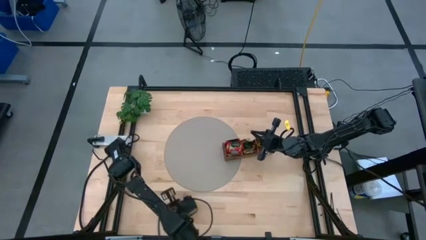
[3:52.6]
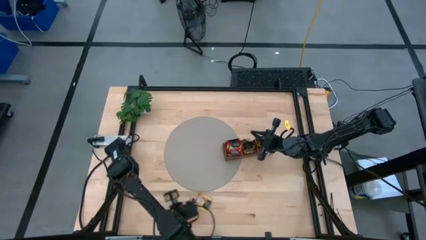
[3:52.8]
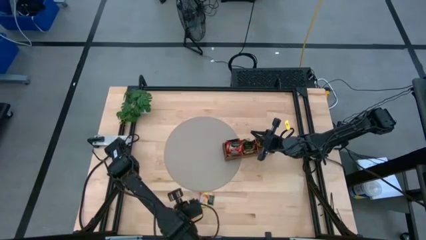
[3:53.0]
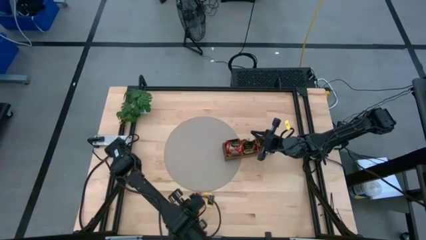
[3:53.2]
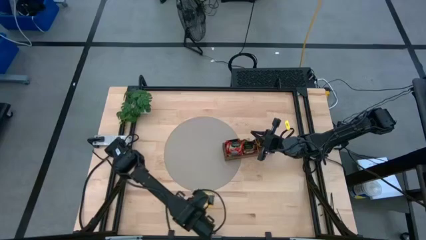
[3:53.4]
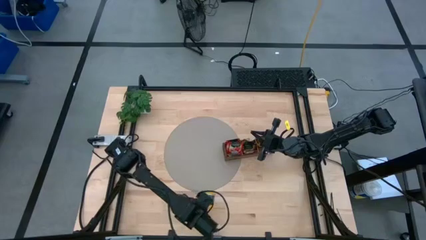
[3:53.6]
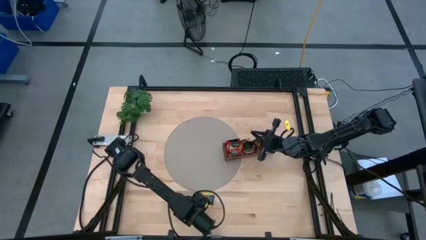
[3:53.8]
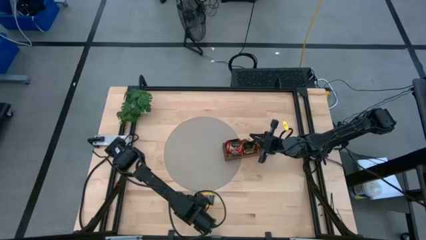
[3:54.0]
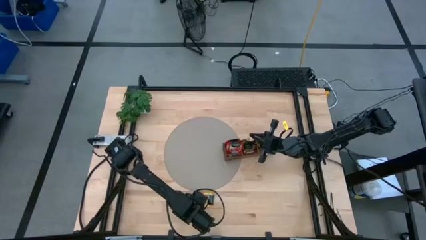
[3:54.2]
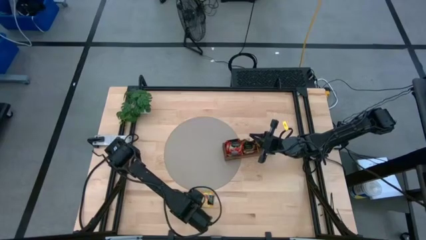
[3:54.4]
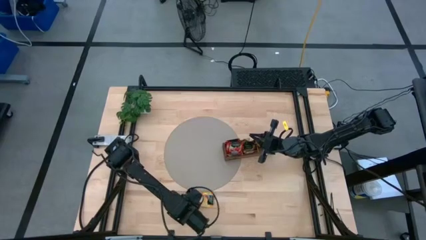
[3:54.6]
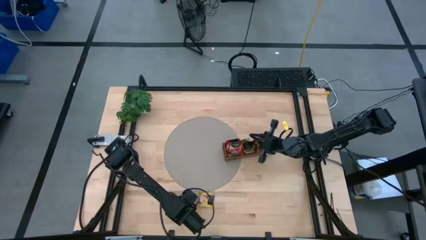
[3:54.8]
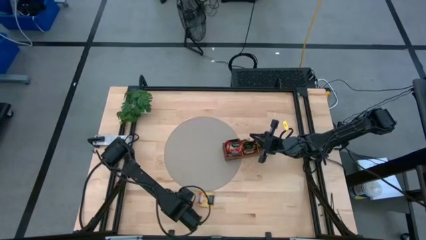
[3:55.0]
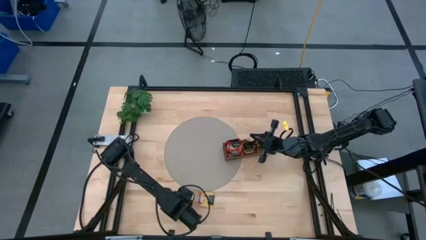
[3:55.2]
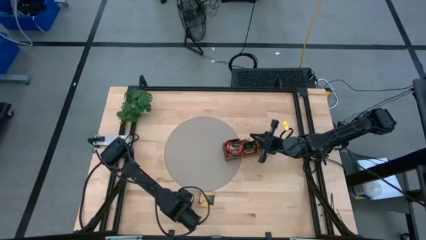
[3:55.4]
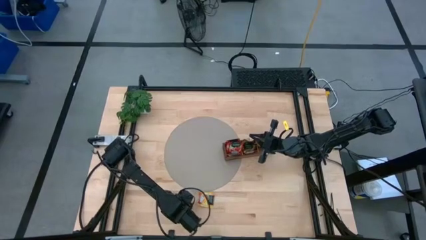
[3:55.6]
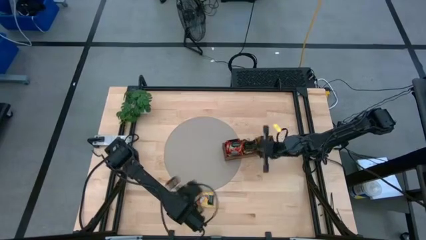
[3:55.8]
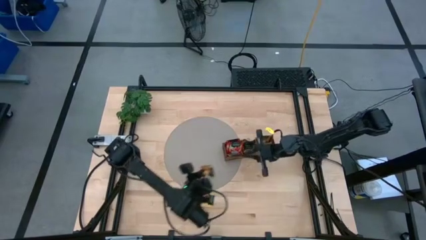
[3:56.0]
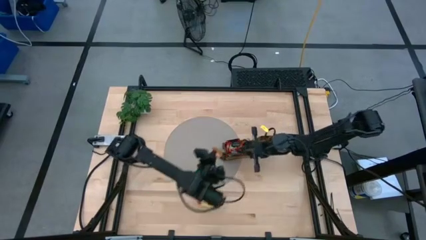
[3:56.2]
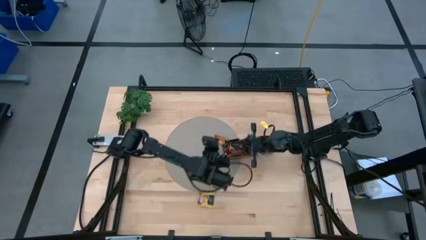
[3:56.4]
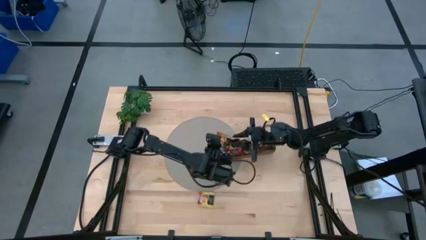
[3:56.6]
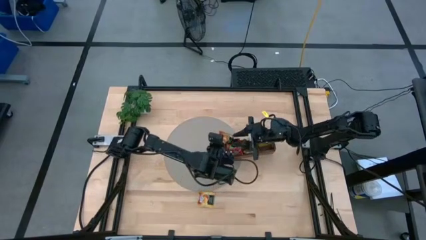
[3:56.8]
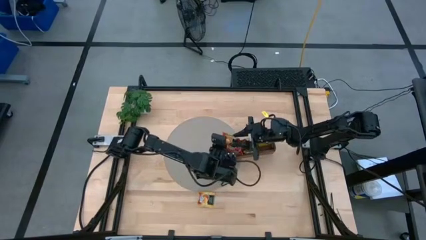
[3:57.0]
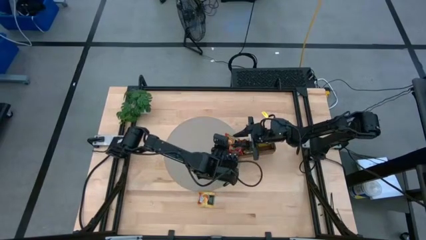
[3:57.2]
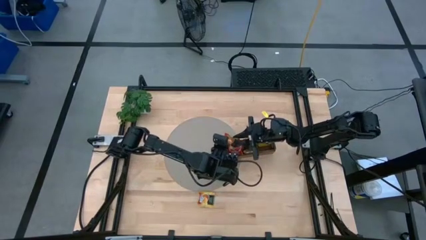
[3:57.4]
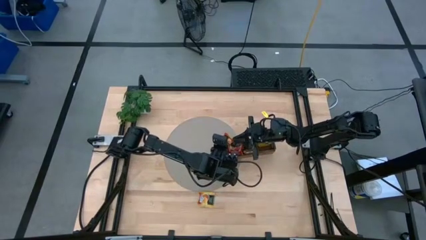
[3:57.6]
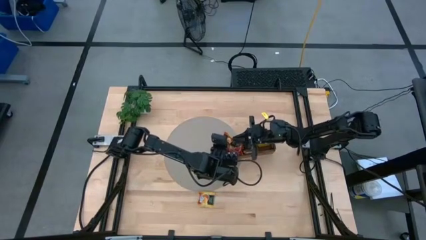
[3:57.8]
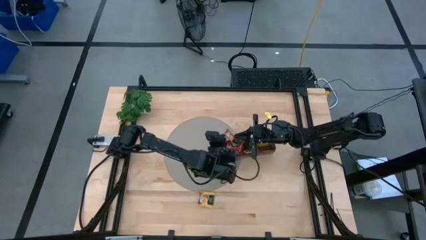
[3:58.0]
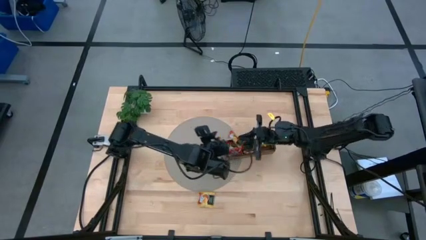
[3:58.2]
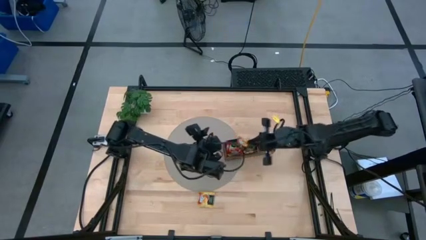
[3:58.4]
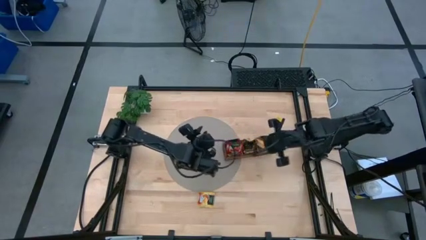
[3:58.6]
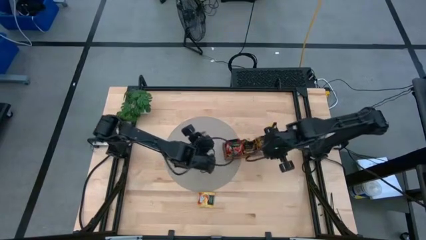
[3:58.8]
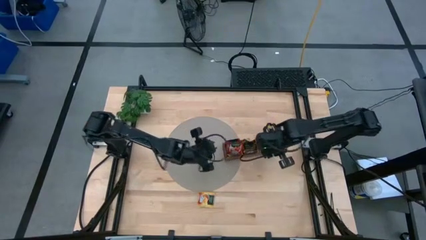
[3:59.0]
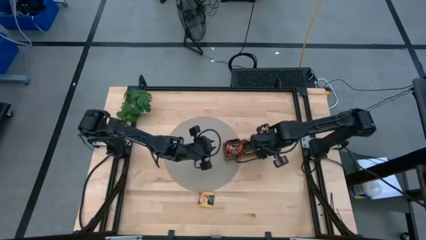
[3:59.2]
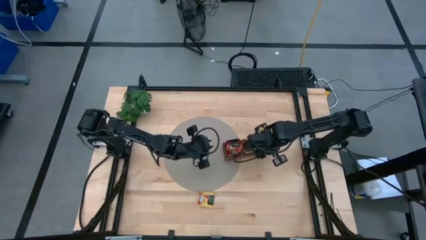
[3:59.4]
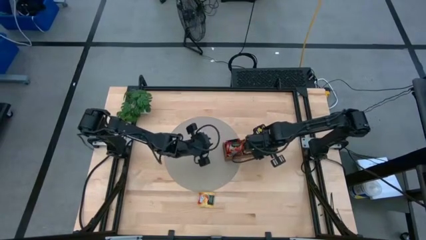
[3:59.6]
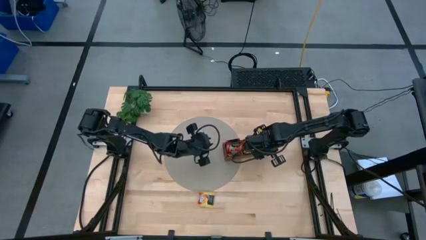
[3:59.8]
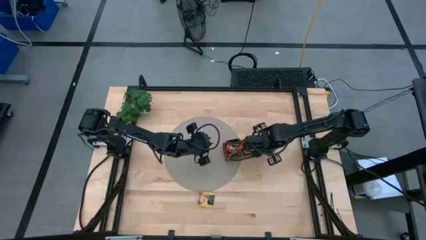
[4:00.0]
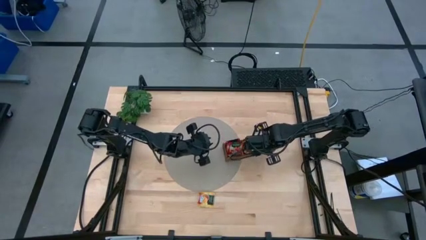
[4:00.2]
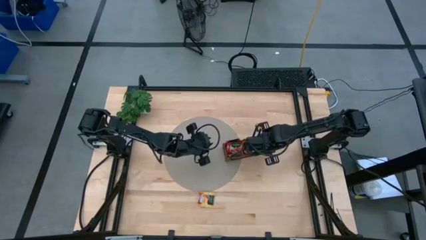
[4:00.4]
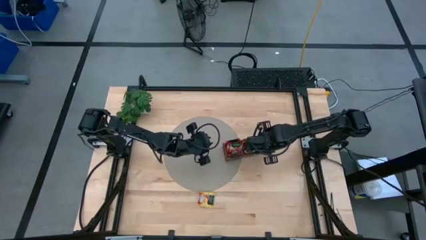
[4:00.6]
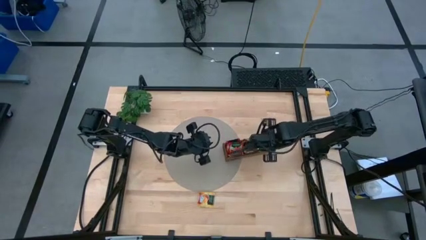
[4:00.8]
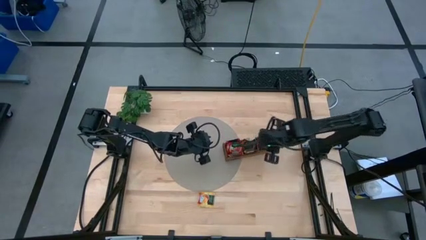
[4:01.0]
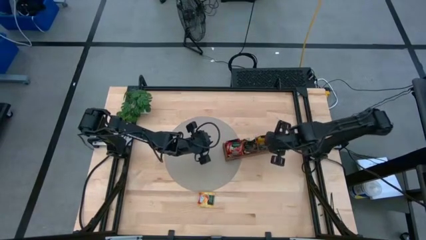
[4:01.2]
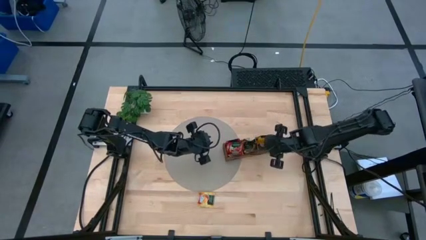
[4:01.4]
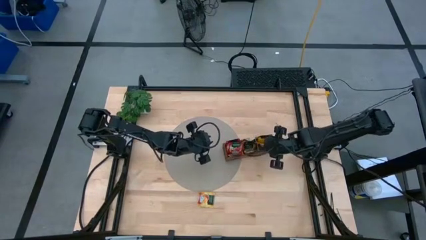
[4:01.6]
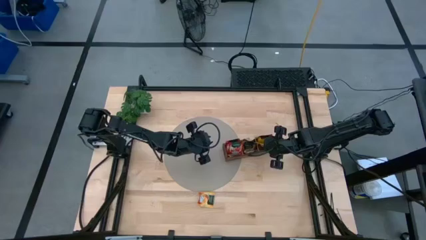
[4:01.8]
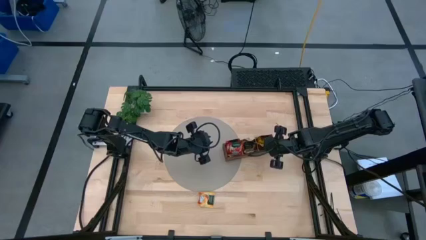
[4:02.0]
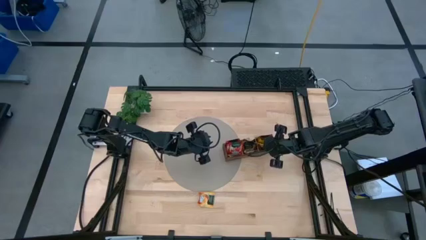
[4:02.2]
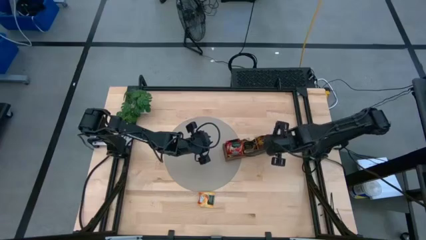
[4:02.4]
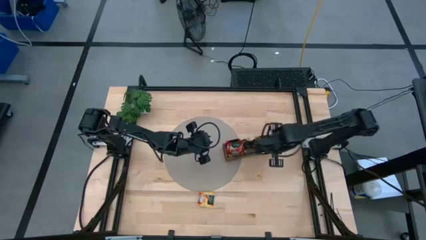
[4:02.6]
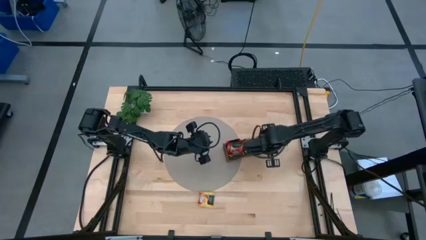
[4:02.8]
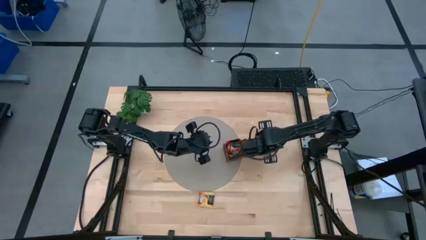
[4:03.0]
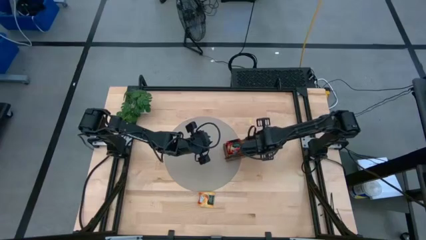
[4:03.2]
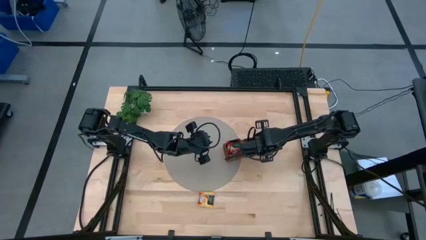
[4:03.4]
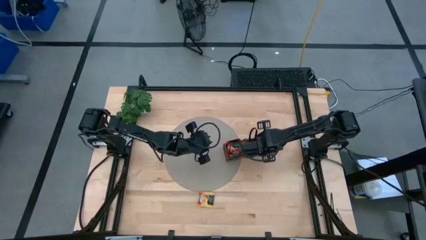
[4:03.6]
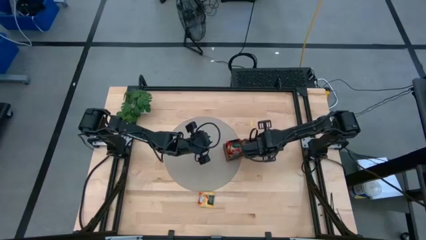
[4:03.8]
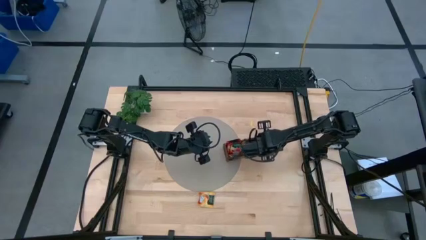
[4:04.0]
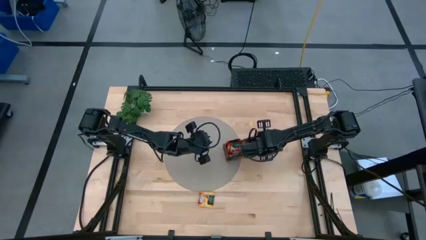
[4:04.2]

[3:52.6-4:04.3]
Task: Pick & Place Tea
Put the yellow tea bag into the right section of the wooden organizer

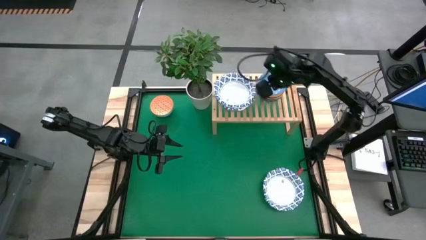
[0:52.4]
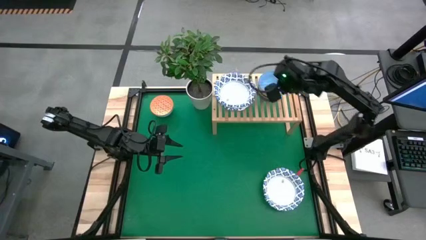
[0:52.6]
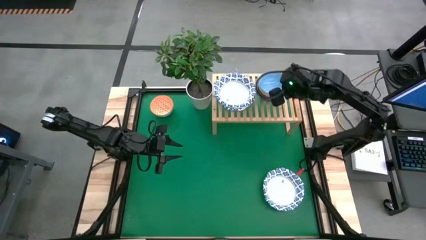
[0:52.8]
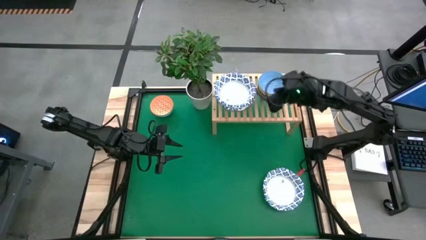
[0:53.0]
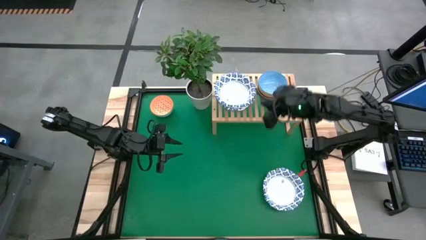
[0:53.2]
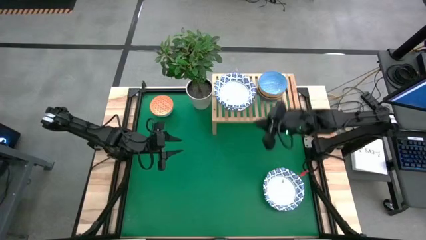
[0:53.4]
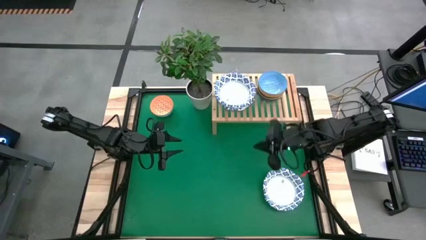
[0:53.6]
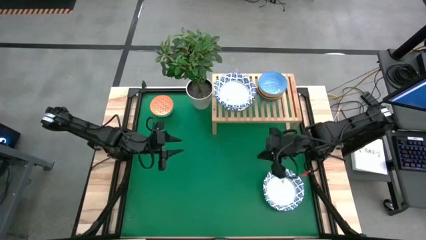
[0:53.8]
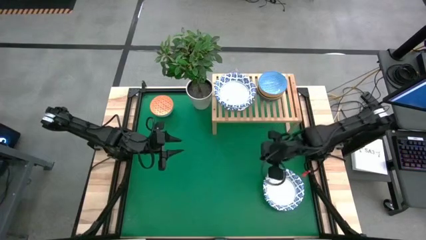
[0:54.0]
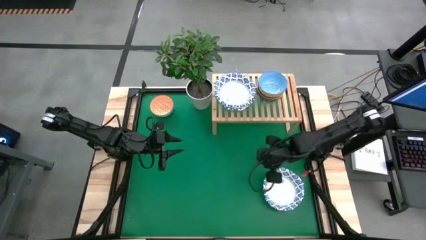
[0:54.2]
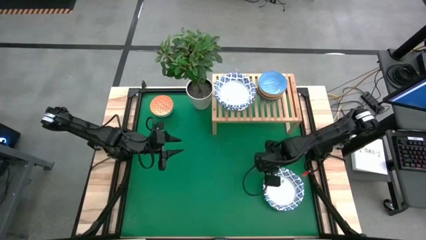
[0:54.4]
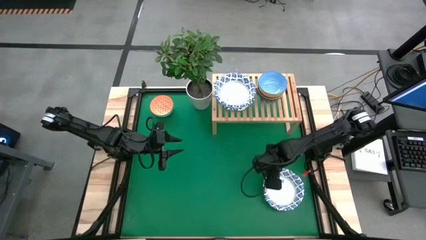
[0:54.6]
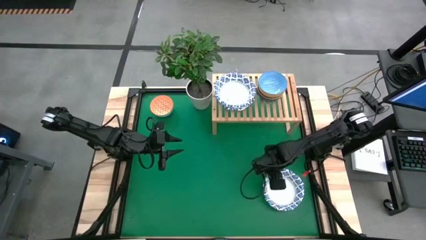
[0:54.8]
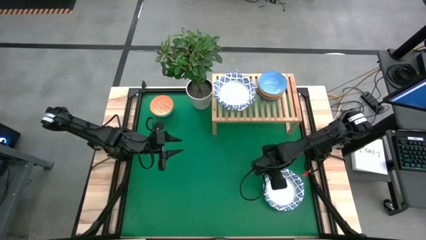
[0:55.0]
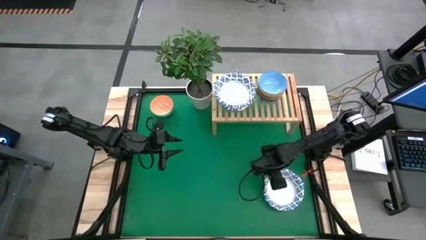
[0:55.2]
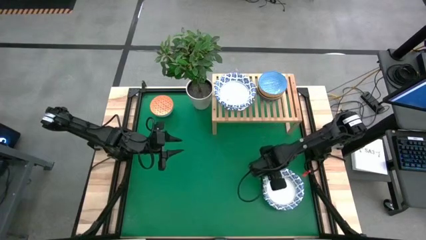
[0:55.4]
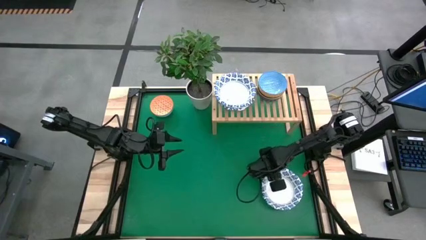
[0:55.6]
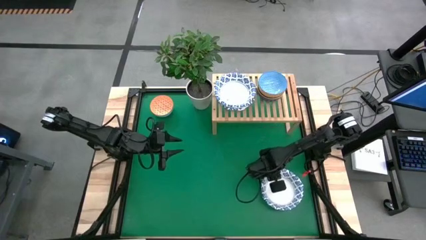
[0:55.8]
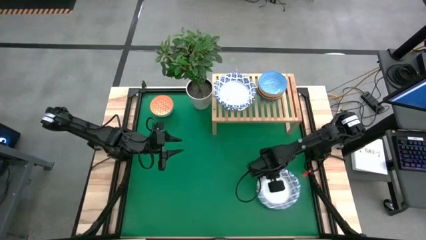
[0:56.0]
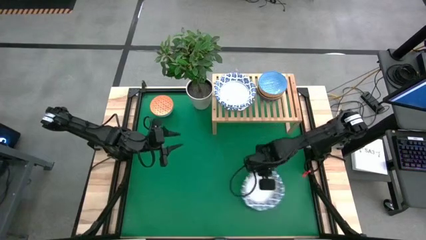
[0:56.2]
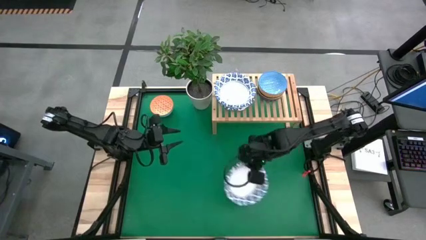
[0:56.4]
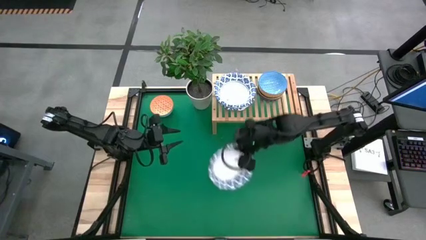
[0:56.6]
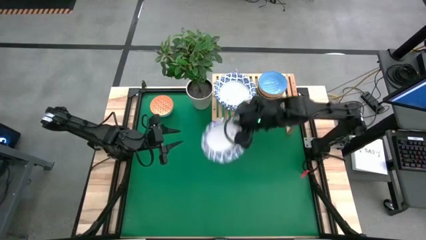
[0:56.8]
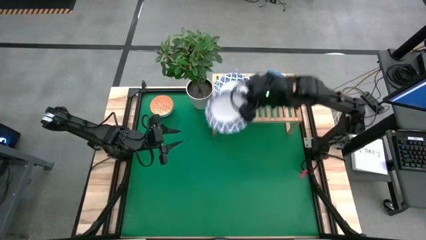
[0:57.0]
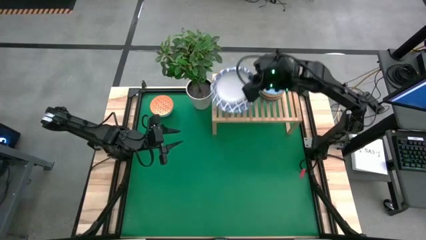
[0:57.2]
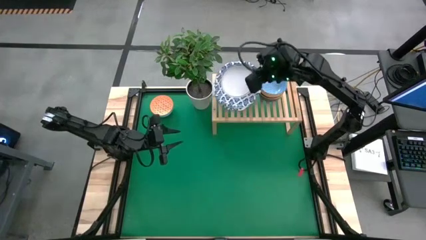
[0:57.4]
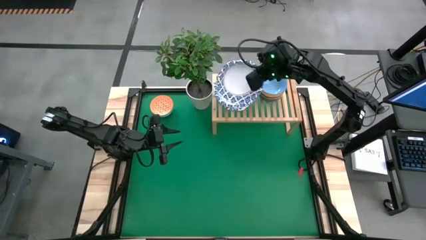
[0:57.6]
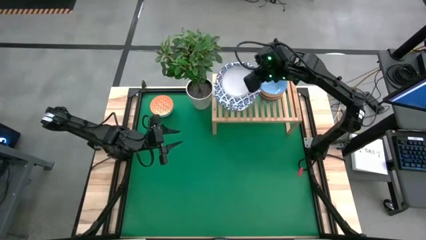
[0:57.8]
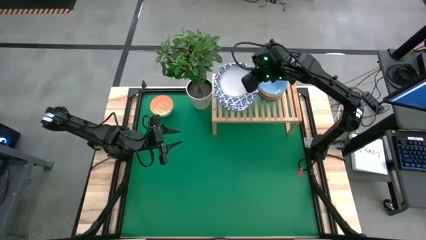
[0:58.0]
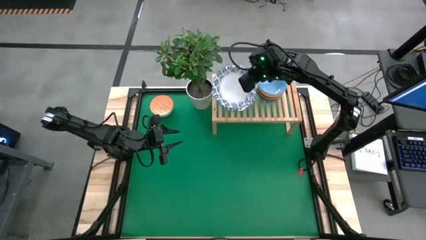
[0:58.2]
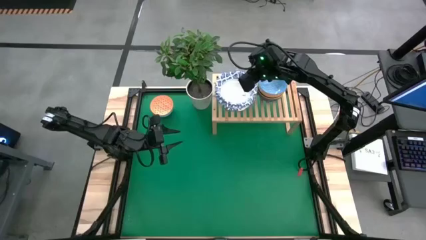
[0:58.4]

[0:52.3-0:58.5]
Task: Place and stack bowls onto a shelf
Stack the white plate on top of the white plate on the shelf
